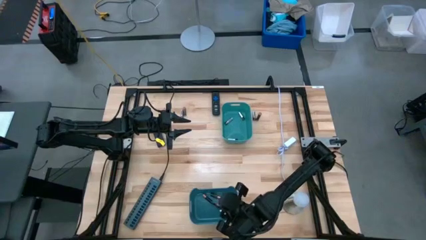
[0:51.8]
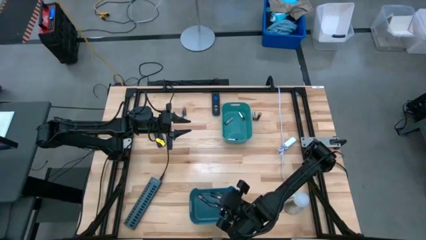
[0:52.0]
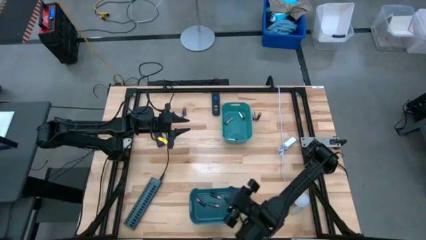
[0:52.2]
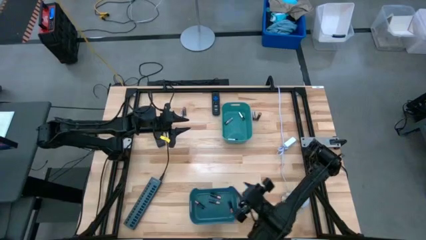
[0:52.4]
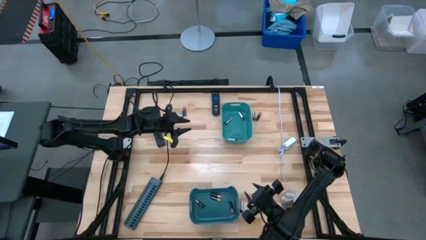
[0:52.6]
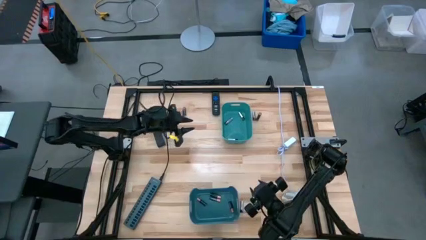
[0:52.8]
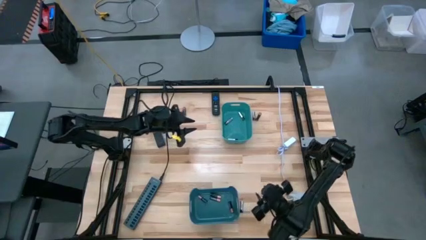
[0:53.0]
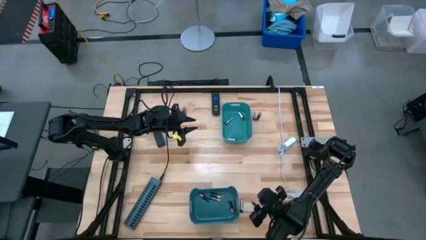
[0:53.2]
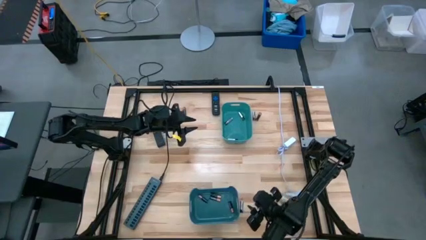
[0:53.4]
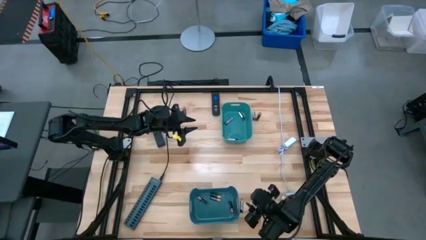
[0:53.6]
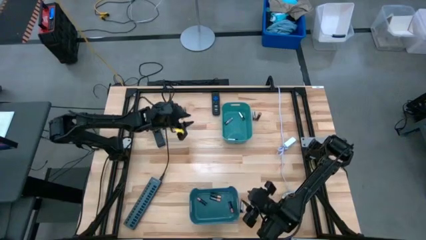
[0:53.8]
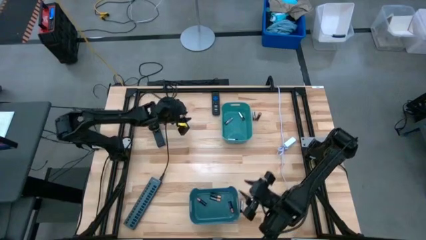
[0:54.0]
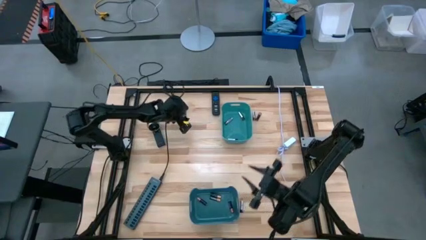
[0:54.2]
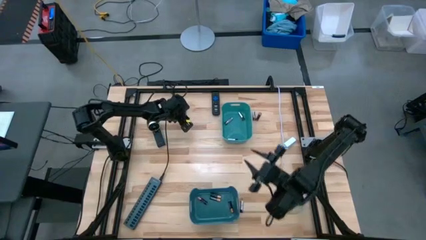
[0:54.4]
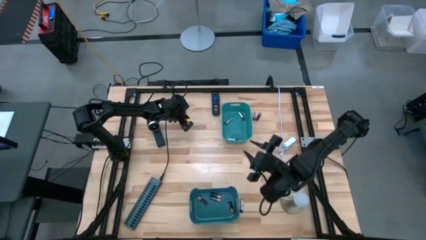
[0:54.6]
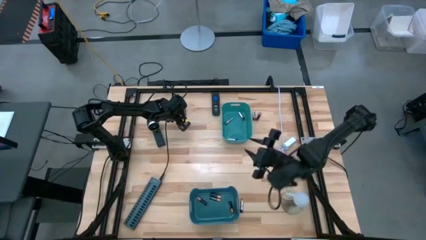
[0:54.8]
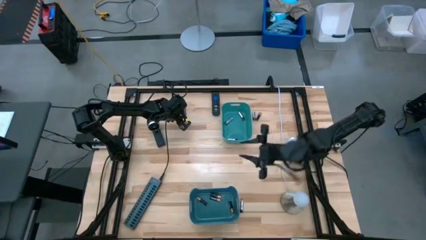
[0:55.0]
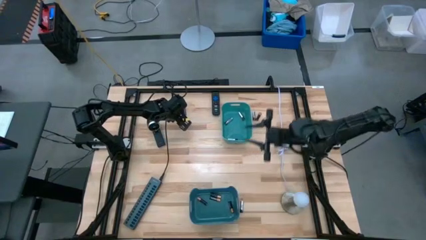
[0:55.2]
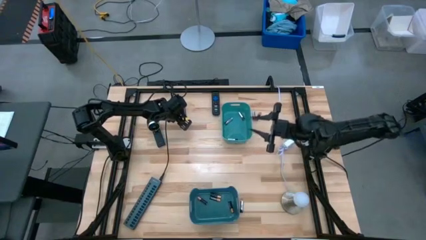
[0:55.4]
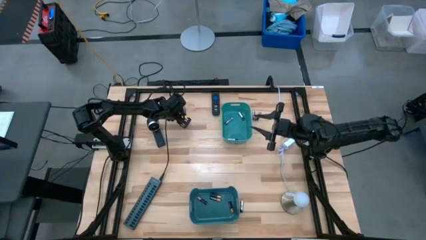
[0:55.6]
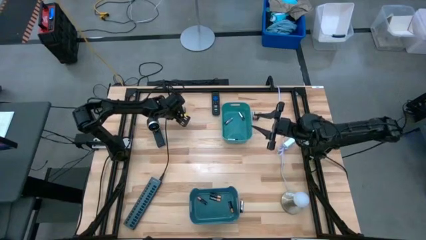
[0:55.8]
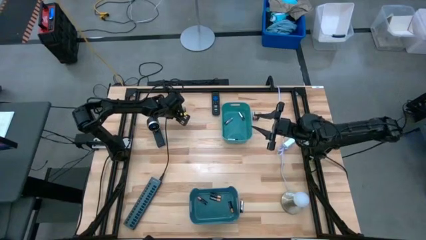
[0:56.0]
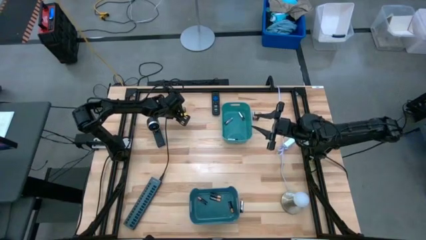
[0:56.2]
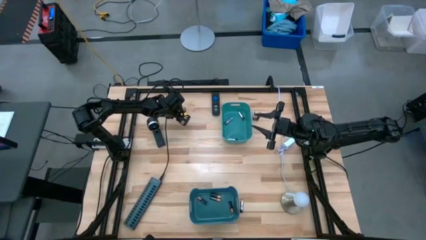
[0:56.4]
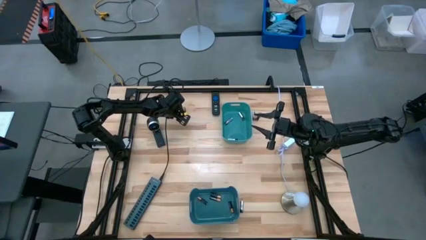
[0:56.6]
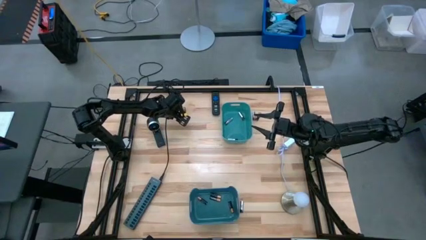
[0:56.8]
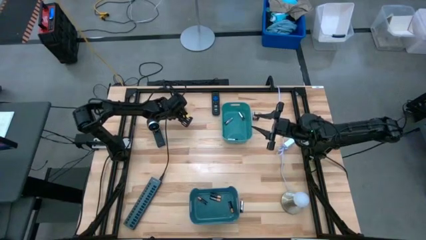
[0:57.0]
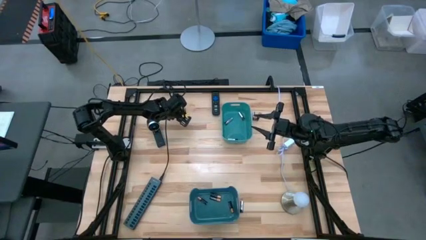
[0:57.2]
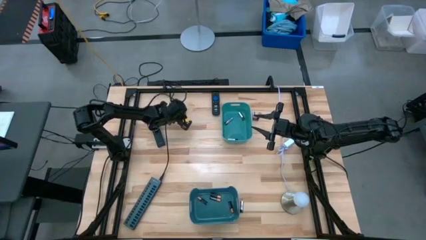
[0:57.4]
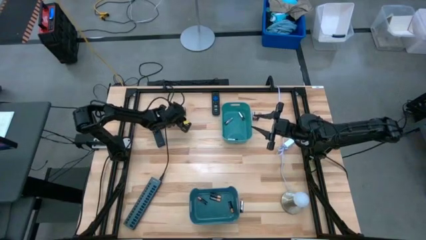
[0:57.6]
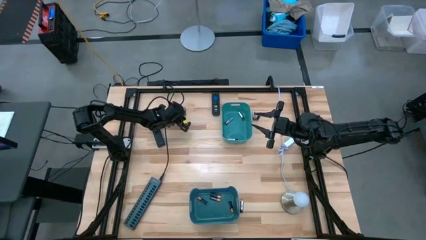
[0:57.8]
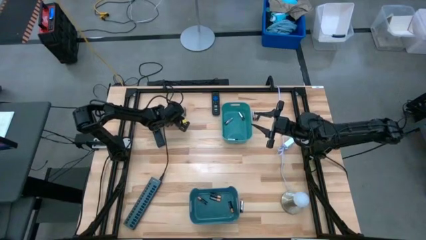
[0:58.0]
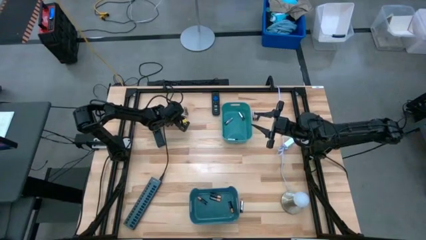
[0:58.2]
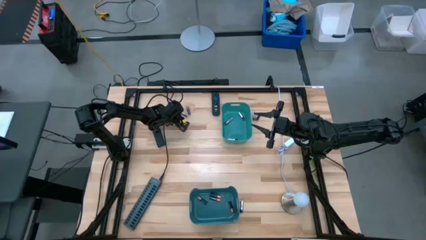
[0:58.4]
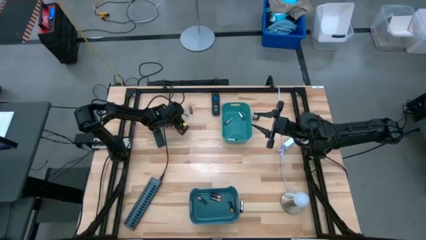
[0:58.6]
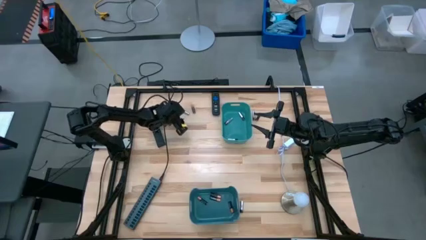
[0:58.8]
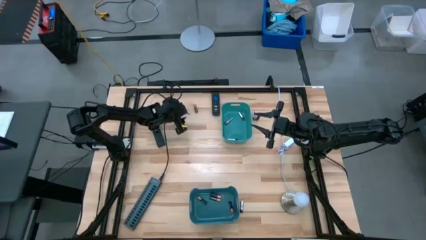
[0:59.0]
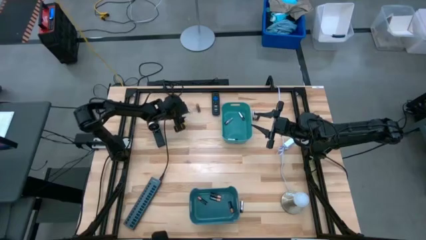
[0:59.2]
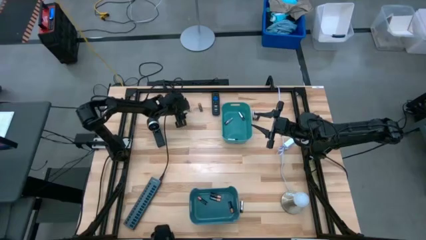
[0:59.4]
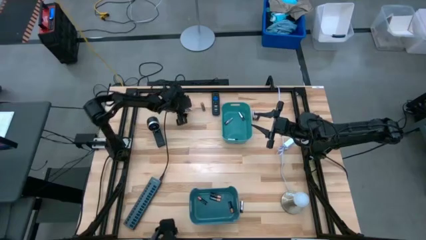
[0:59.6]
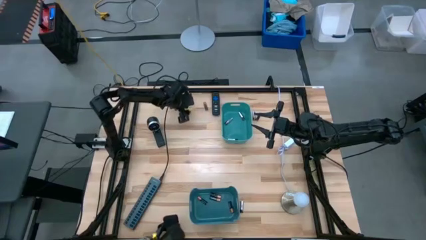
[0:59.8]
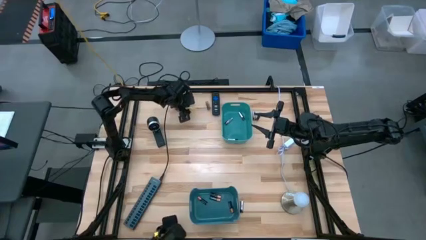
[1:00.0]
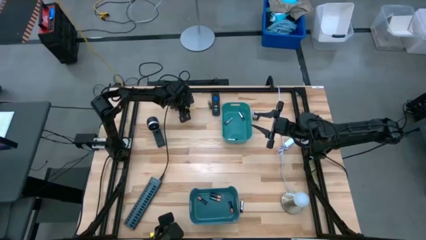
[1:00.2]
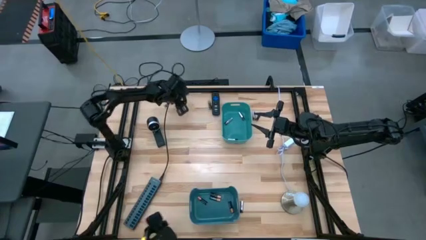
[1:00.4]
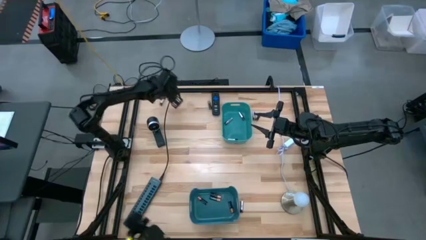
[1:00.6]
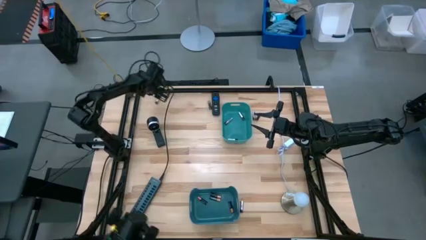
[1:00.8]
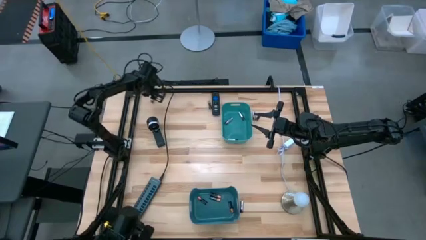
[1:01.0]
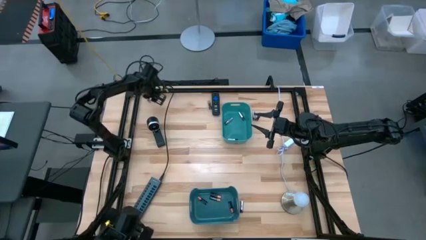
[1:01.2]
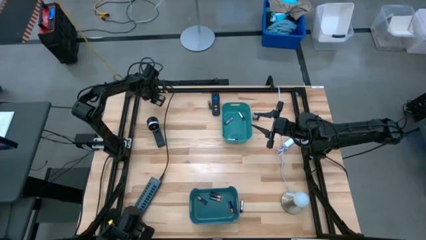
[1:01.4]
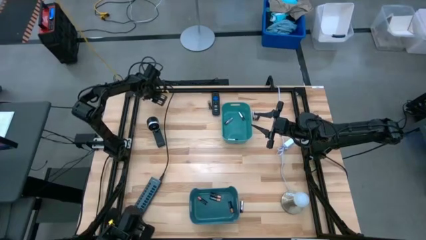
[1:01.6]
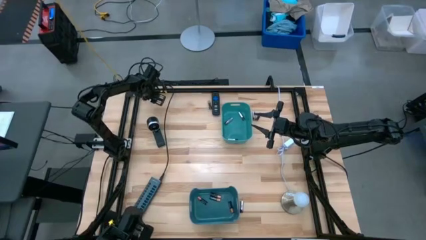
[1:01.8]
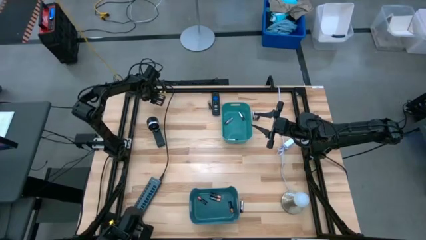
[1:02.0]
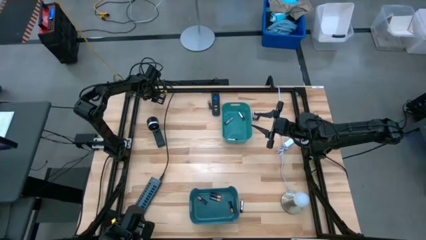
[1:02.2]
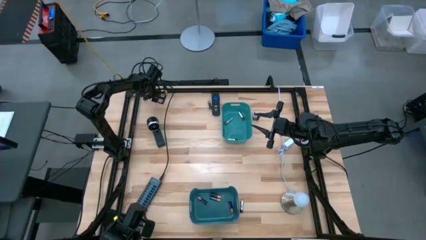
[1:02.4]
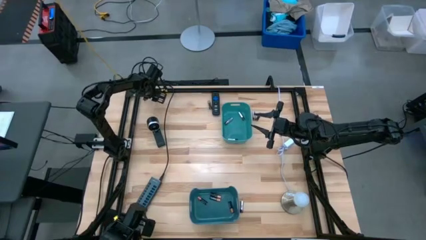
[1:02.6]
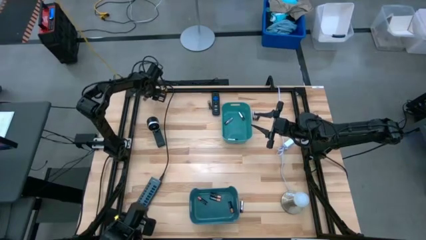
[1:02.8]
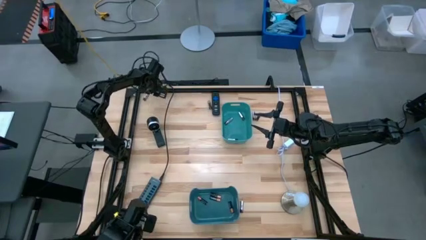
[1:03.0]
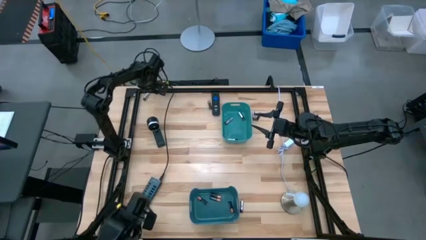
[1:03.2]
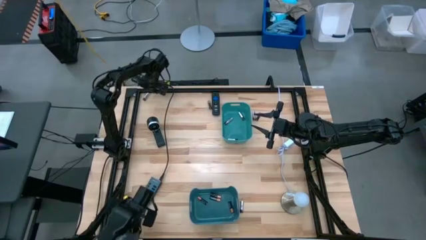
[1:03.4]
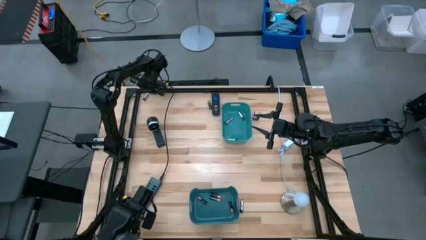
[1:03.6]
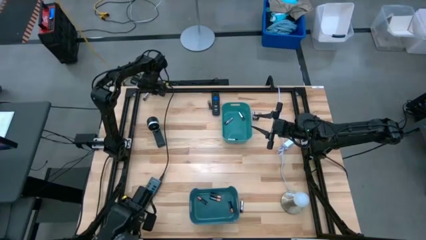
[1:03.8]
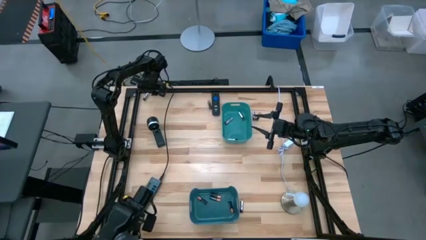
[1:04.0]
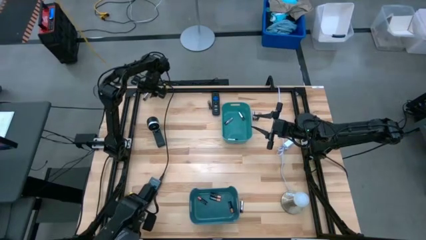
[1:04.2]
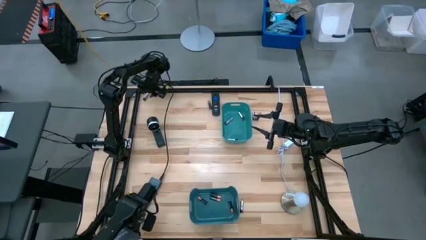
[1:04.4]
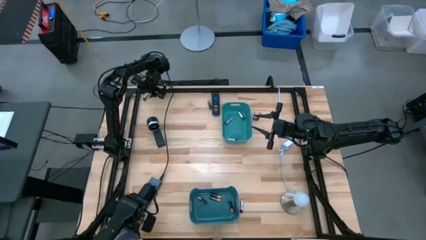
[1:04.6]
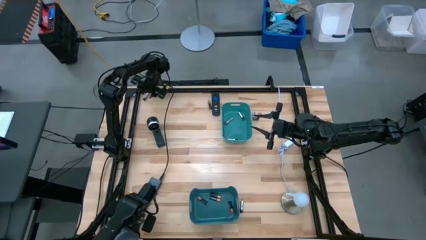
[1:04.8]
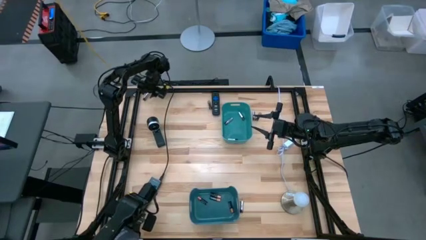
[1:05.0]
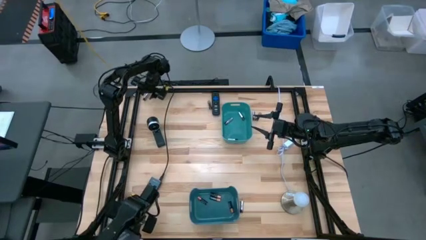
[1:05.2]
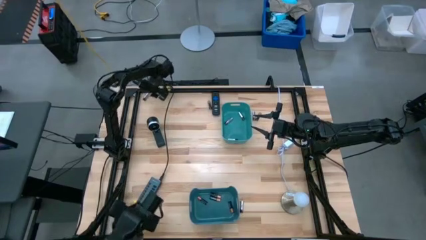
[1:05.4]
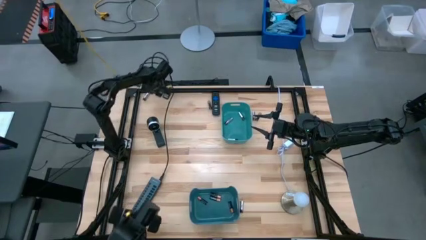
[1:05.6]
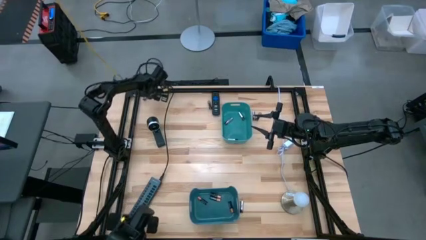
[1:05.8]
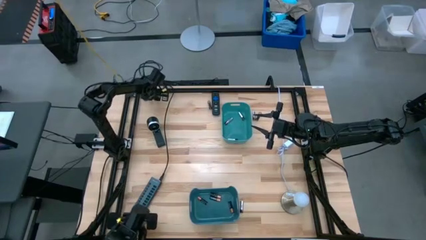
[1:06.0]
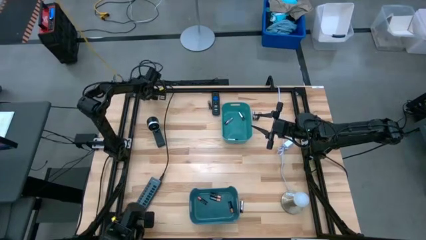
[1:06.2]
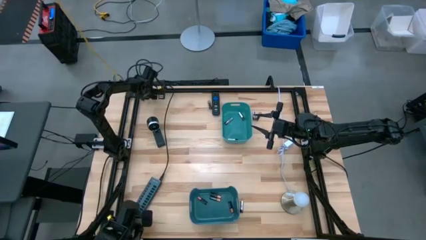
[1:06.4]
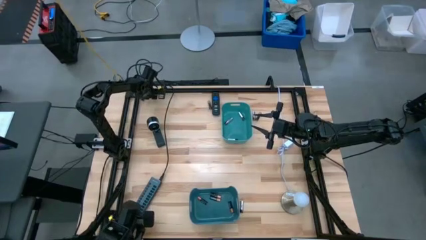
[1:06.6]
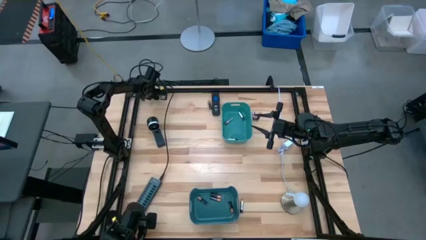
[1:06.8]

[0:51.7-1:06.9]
Task: Sort batteries
Put the silver battery into the light blue bin

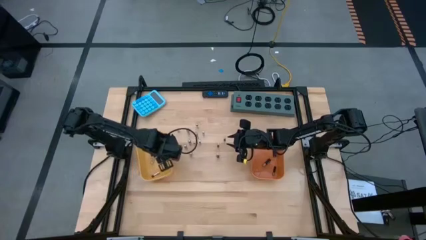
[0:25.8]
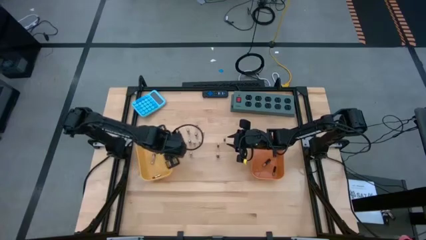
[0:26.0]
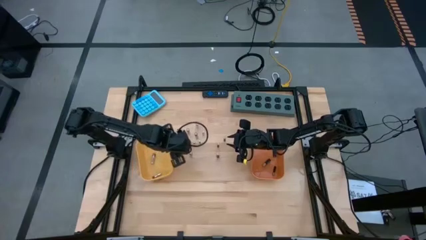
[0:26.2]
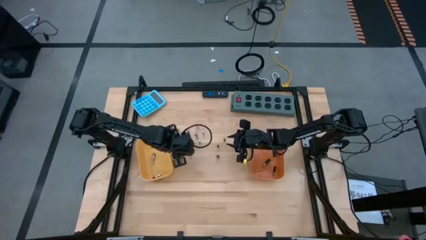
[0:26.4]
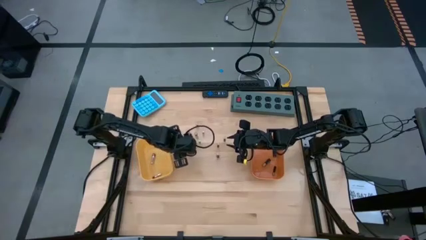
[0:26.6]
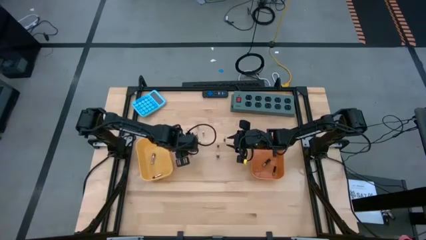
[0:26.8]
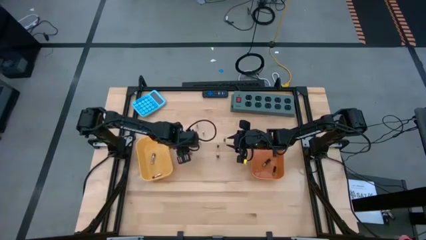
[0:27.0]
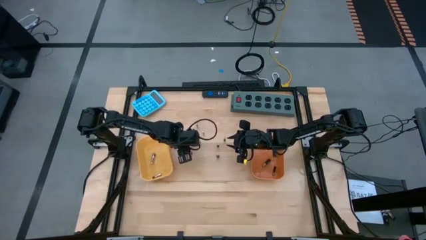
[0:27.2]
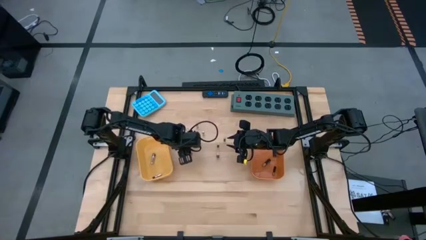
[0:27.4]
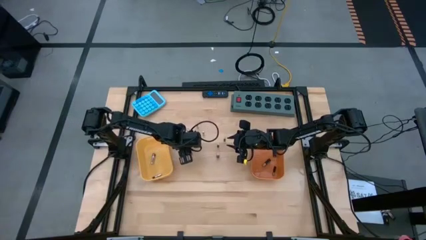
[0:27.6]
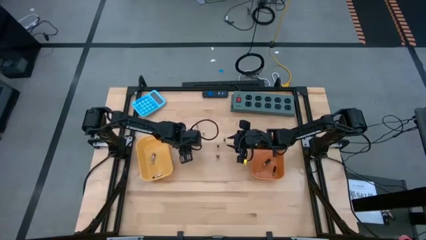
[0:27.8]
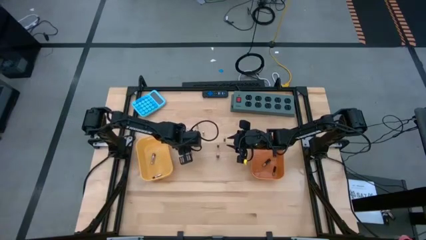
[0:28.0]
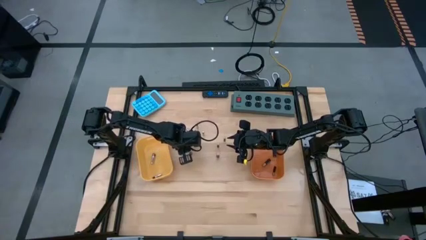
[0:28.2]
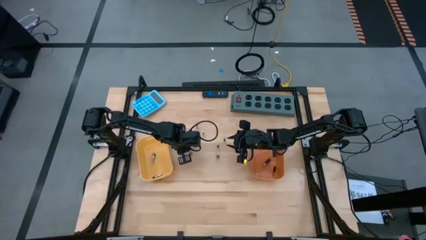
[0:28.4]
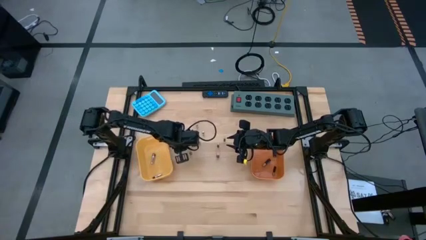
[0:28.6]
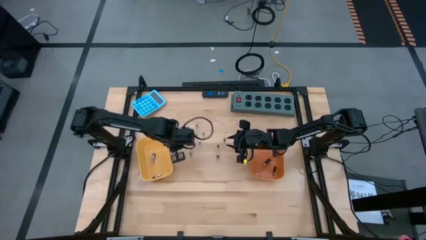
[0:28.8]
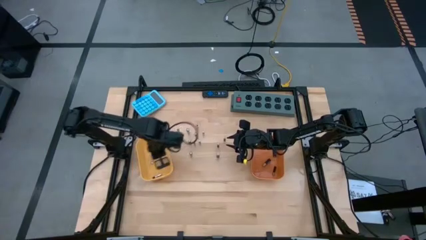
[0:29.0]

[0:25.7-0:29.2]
Task: Sort batteries
Put the silver battery into the yellow bin
